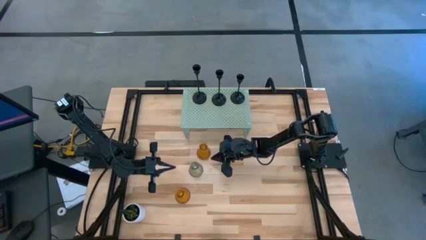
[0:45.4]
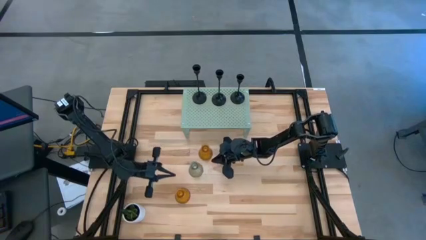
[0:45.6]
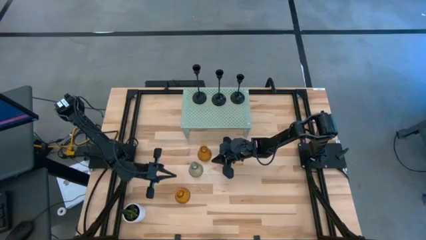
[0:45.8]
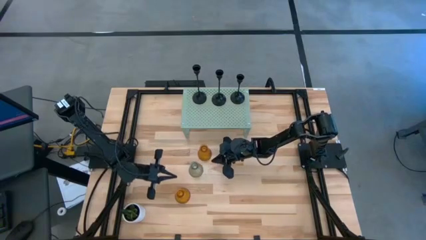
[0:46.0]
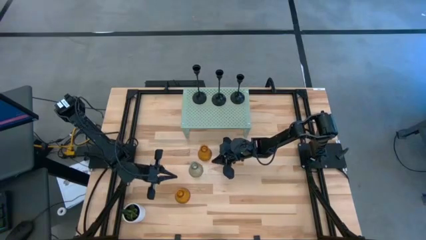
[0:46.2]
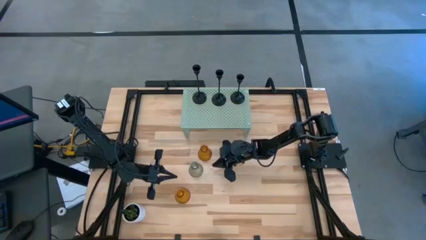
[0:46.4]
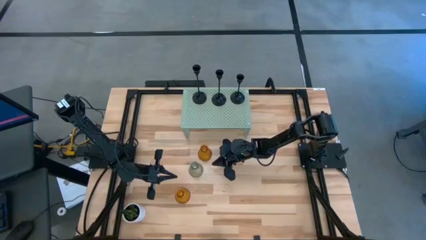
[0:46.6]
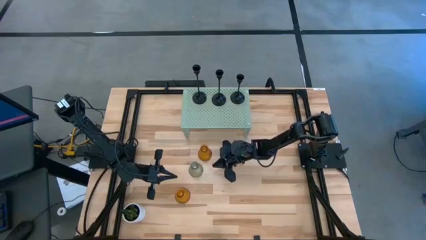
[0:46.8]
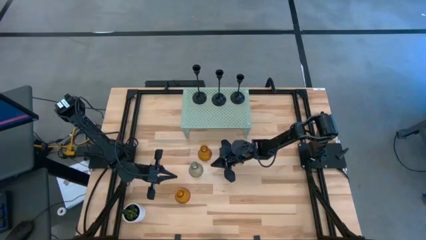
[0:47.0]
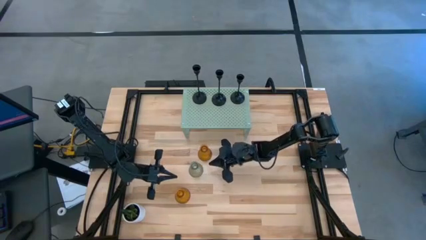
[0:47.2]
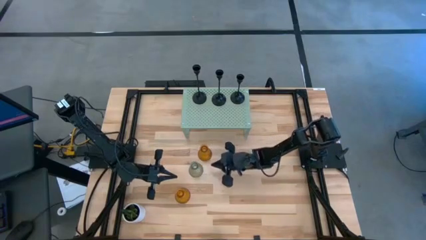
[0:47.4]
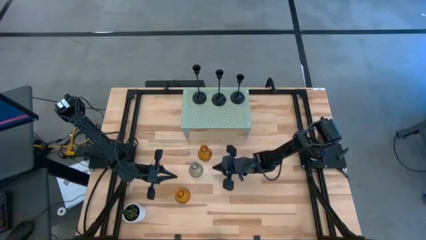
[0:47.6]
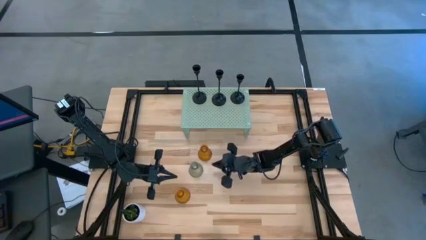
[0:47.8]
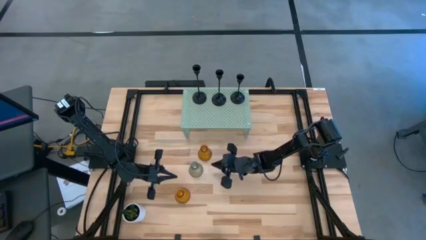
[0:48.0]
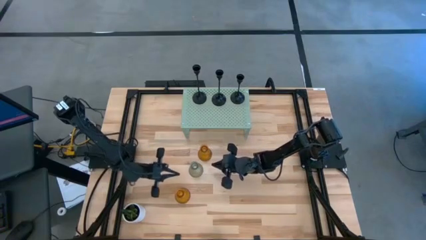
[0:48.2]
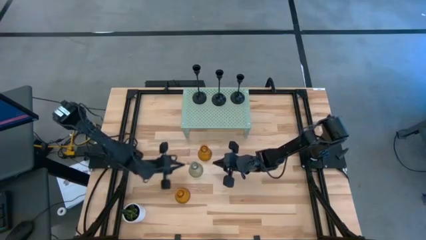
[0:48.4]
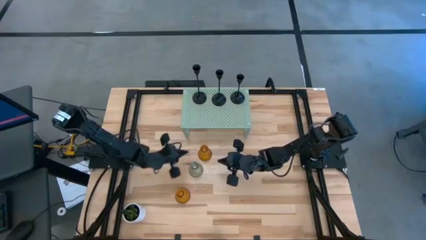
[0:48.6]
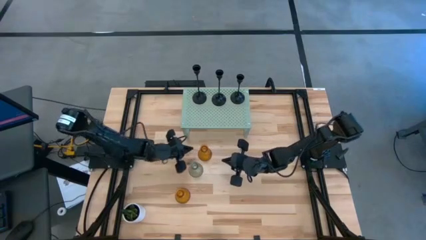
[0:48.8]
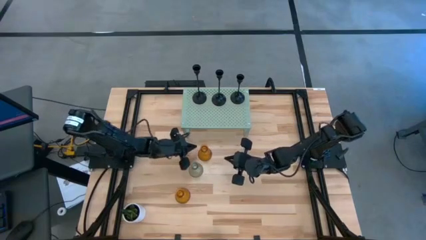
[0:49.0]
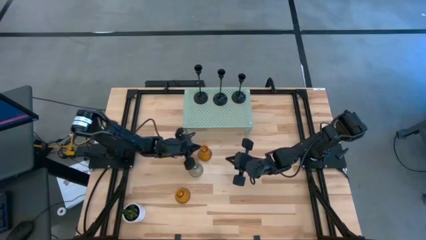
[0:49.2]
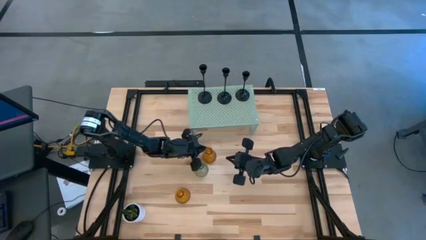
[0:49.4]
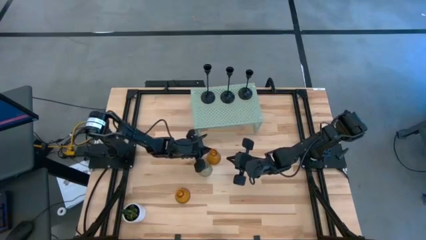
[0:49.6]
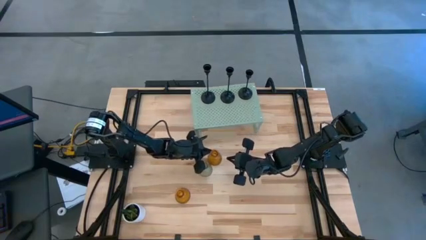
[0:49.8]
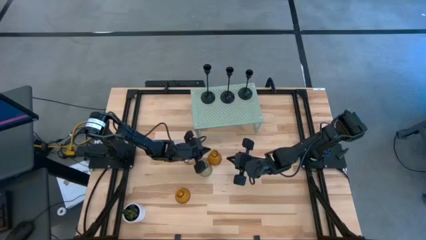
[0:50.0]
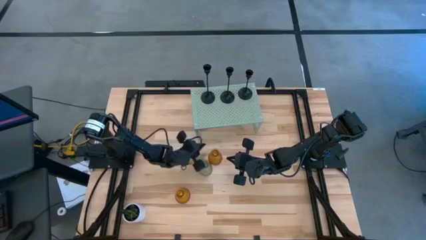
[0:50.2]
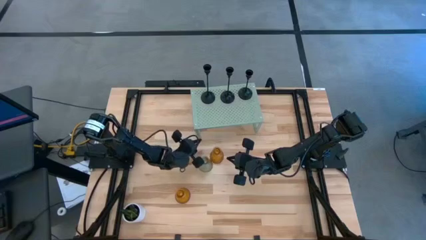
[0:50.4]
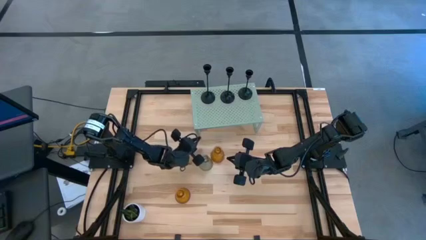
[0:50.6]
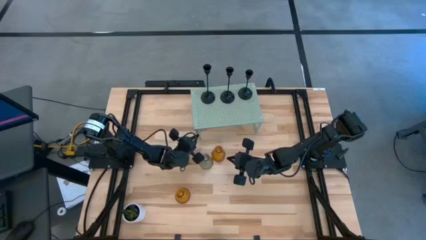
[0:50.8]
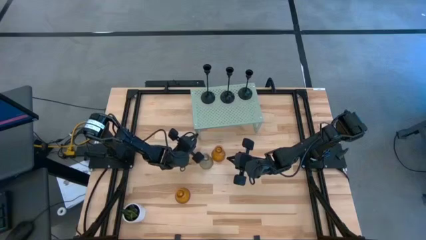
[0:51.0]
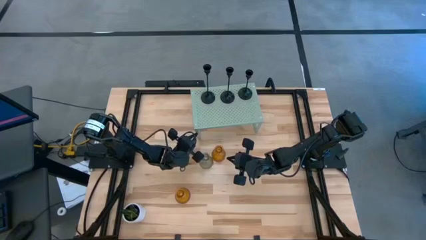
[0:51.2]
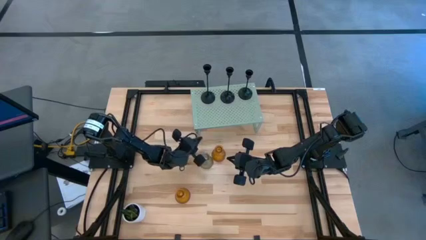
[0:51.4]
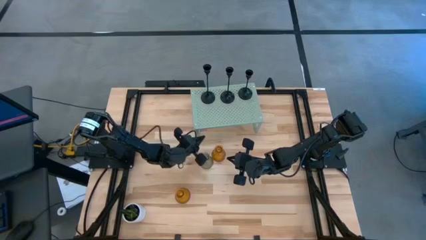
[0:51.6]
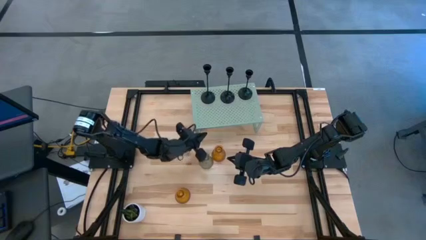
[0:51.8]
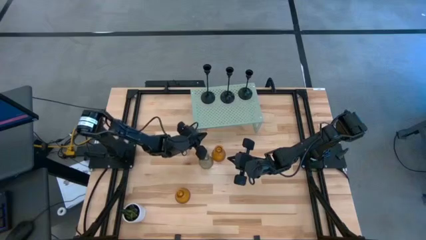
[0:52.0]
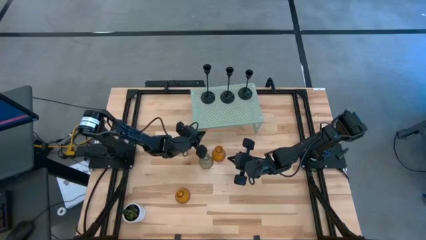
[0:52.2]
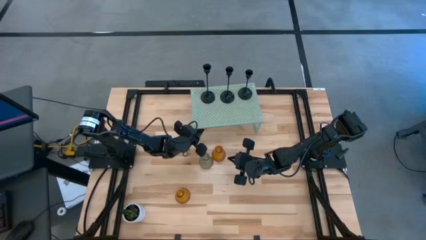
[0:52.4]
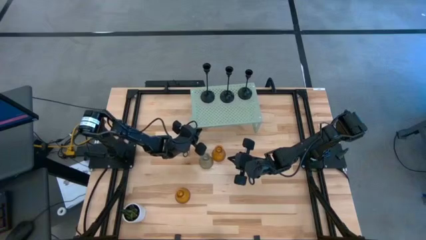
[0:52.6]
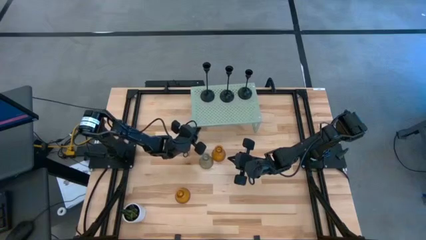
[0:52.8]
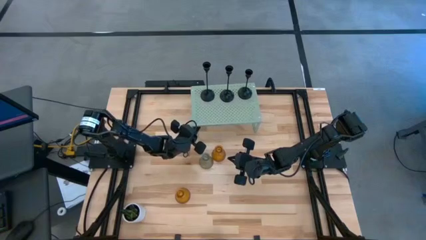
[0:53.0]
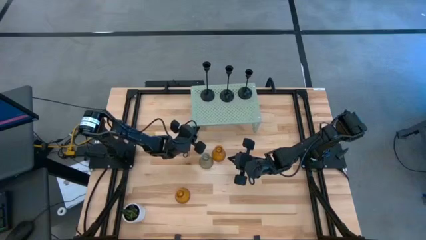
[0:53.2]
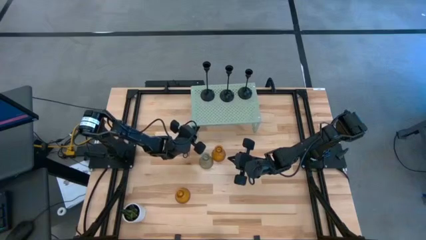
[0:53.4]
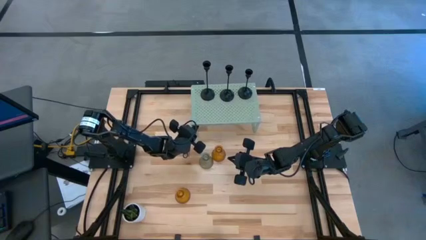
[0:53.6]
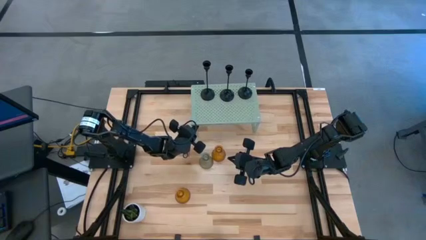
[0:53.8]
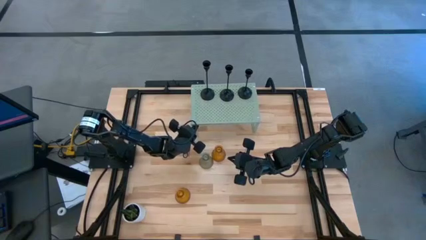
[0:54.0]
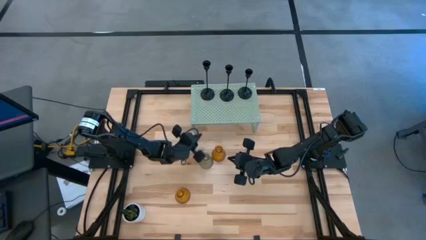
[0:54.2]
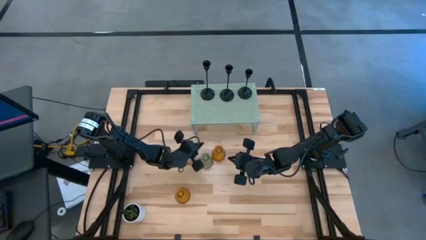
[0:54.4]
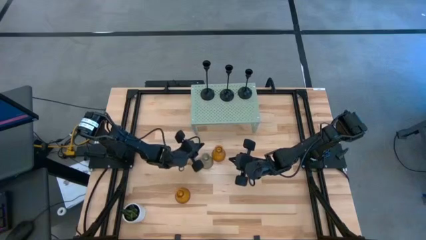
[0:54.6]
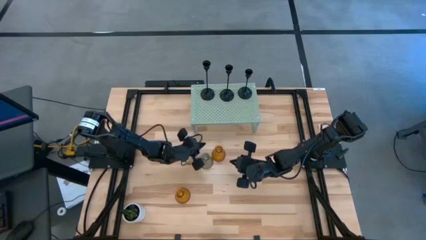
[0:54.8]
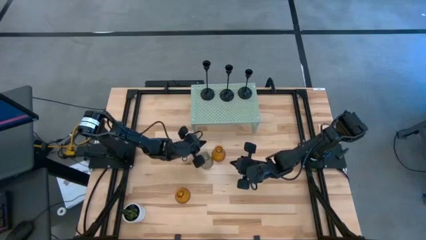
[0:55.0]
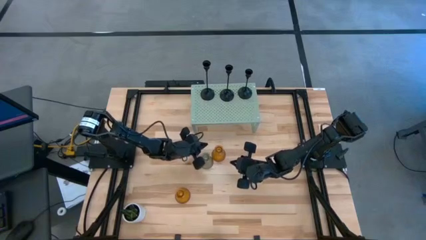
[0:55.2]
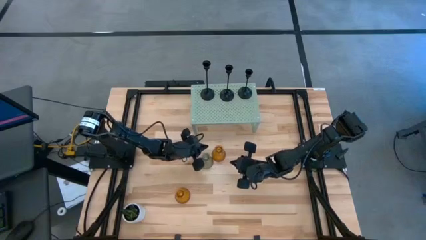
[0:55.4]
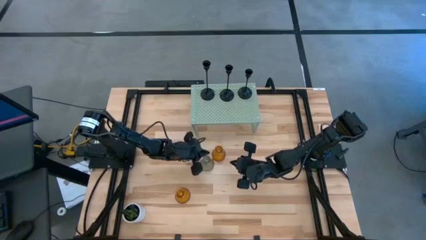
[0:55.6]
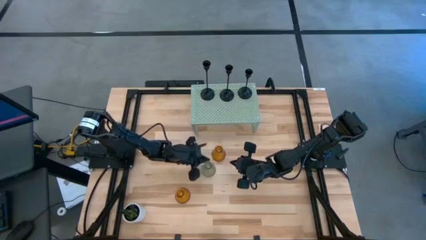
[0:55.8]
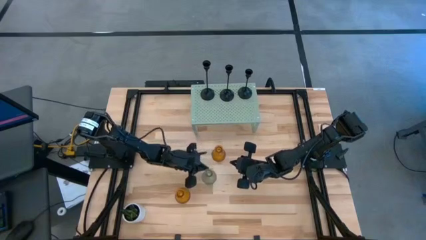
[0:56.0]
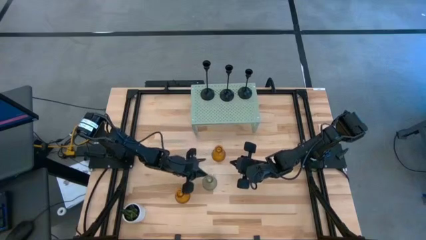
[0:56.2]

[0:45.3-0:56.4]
Task: Pick & Place candle stick holders
Adjust the shelf and the transparent candle holder

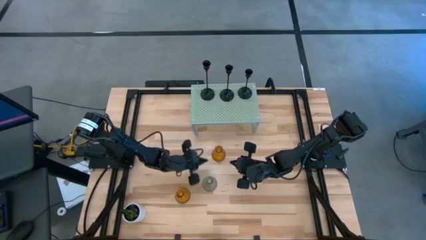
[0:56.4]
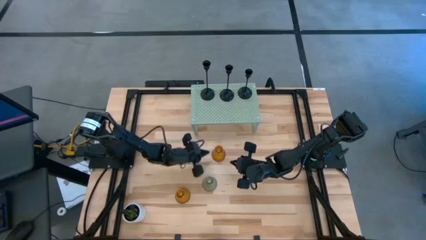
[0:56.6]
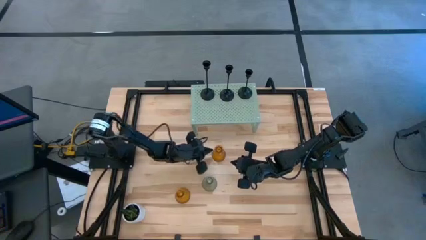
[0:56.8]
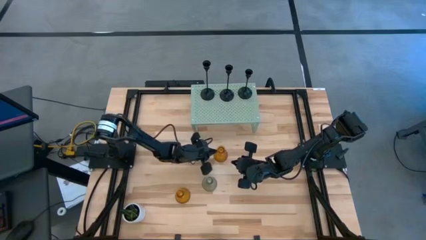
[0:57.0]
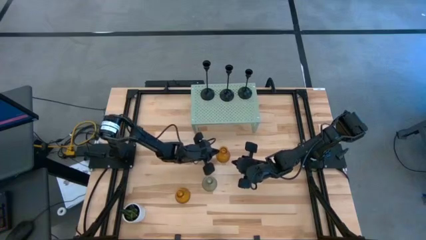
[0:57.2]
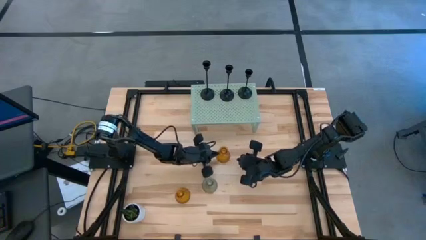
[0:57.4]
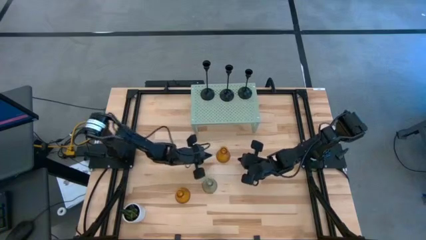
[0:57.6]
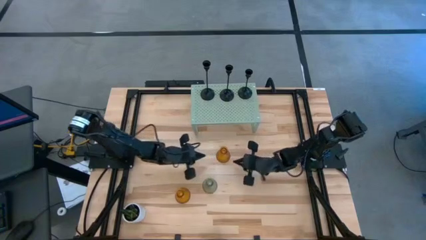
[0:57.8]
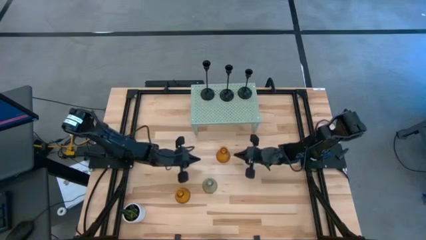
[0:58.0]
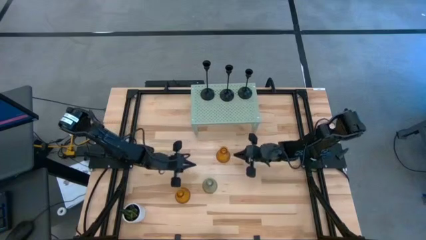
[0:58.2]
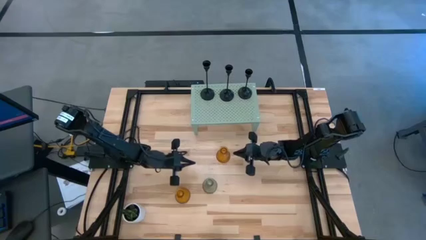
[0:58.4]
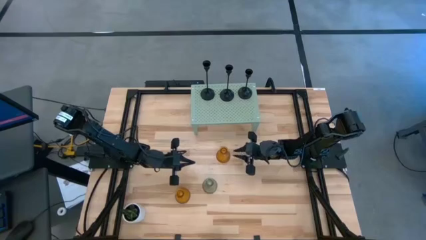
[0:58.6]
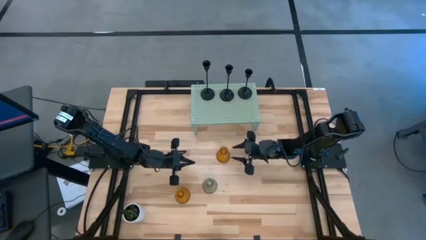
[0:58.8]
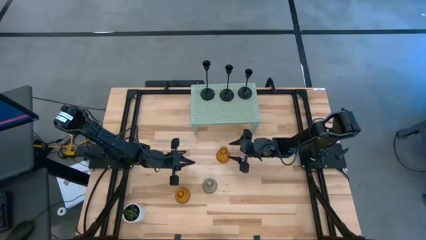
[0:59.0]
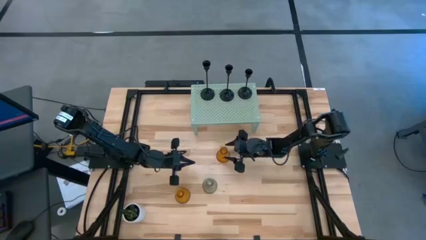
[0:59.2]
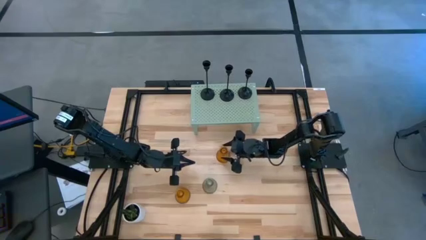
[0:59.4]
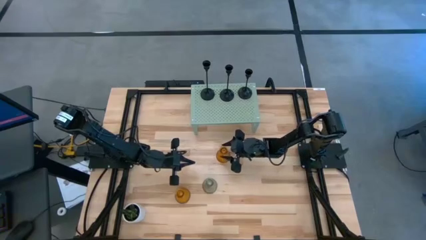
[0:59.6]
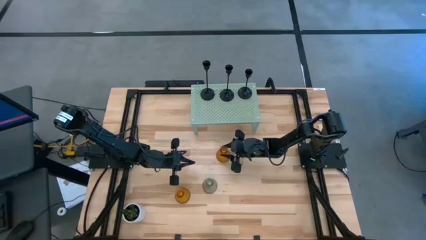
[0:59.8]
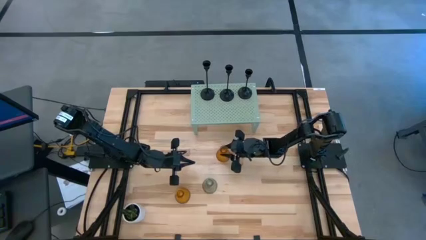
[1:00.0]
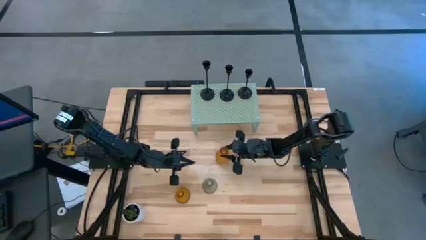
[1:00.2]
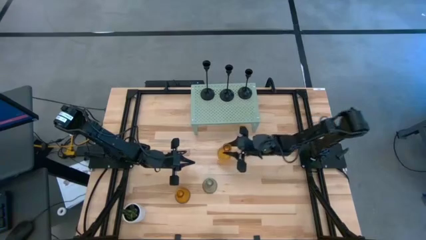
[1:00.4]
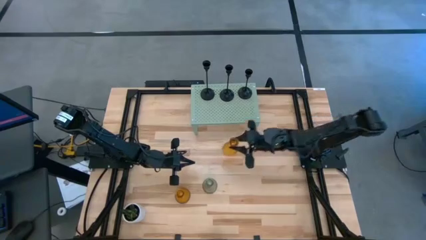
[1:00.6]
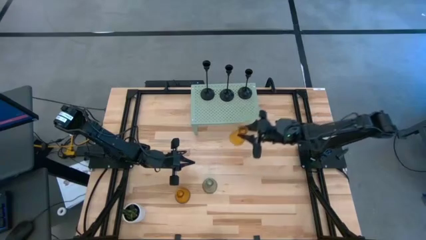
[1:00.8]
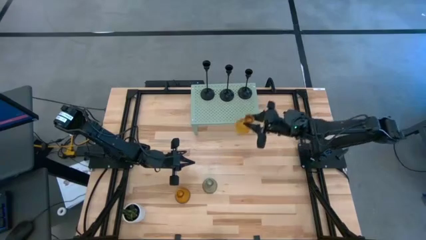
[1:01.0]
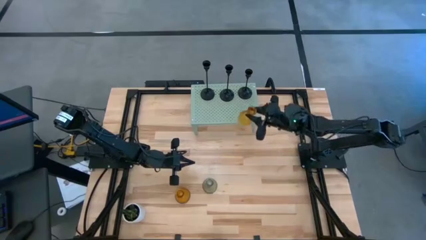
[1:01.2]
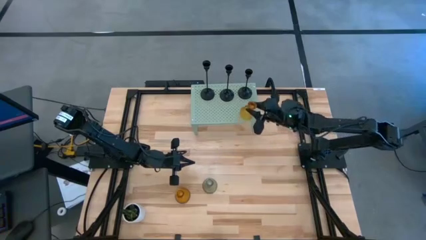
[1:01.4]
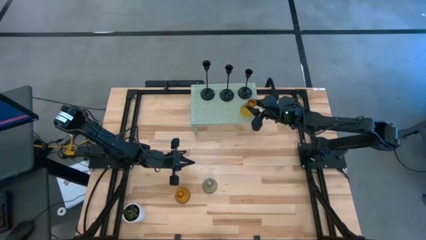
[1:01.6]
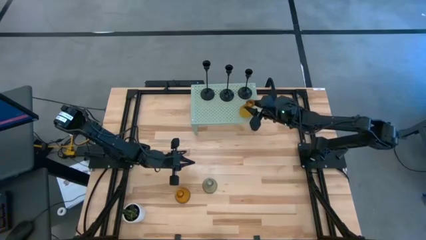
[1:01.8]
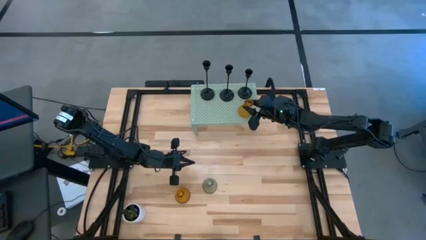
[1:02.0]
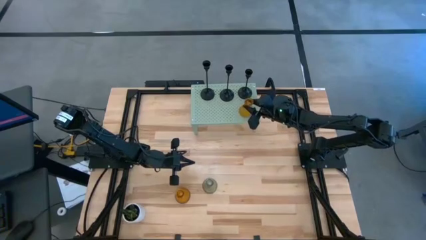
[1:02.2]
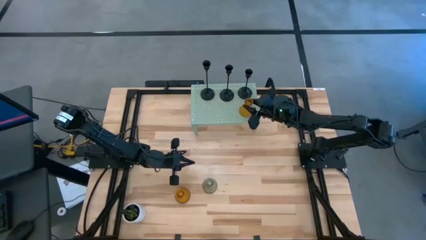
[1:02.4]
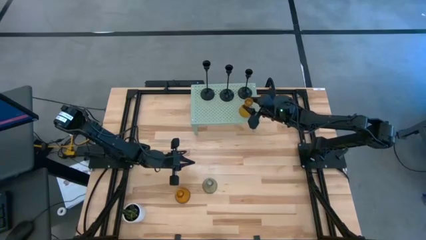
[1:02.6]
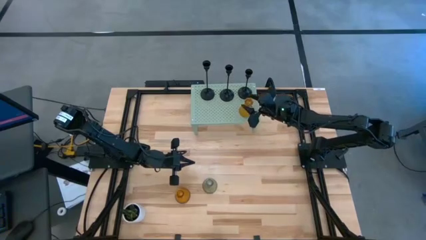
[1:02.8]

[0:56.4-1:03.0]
Put the brown glass candle holder on the shelf
